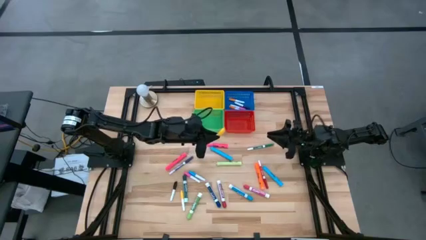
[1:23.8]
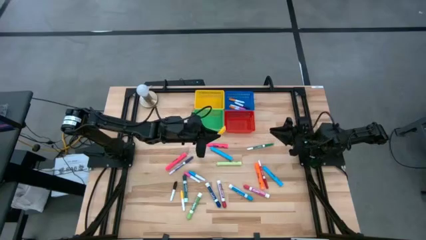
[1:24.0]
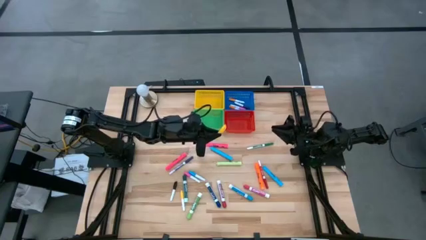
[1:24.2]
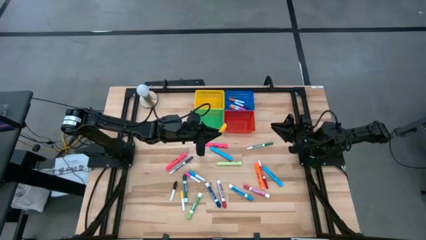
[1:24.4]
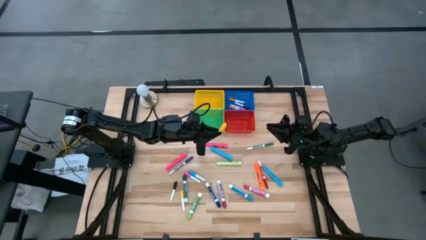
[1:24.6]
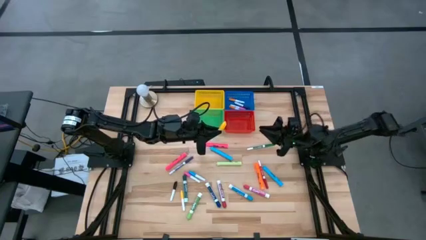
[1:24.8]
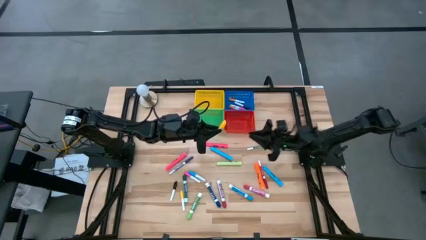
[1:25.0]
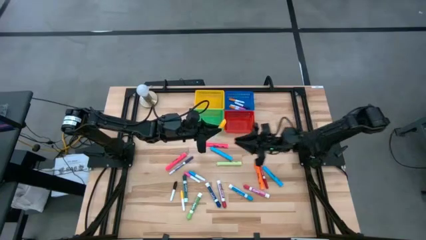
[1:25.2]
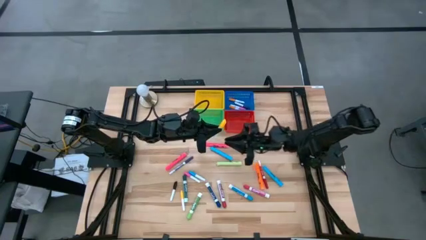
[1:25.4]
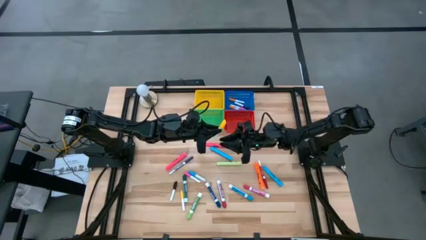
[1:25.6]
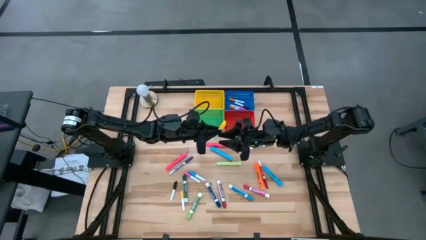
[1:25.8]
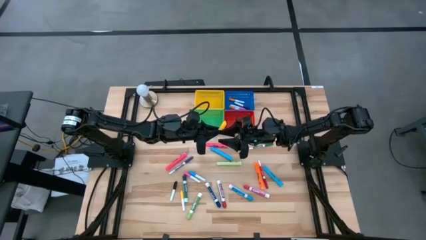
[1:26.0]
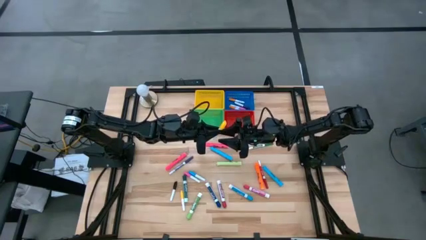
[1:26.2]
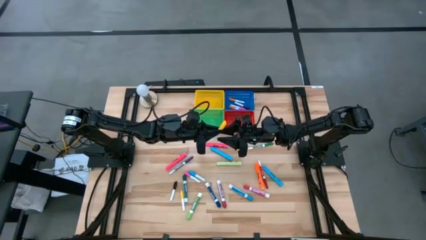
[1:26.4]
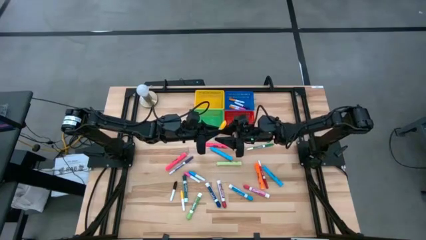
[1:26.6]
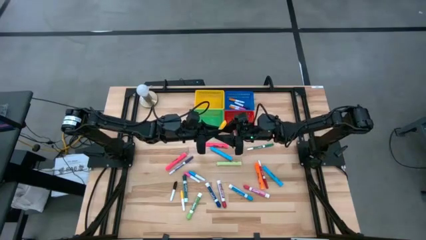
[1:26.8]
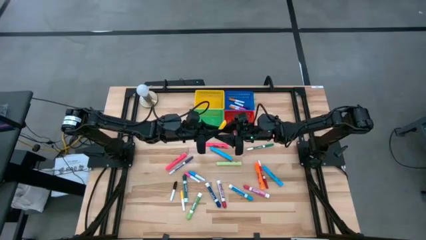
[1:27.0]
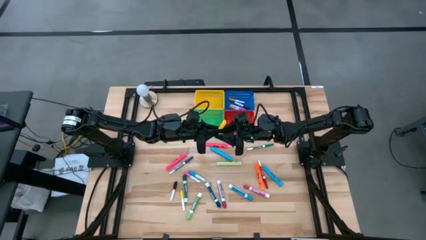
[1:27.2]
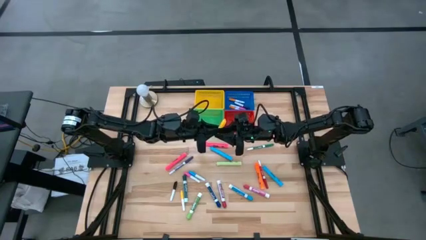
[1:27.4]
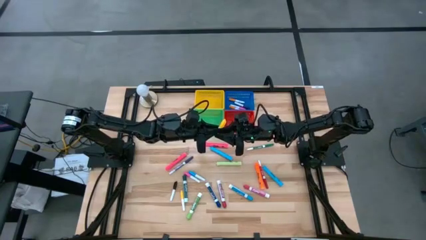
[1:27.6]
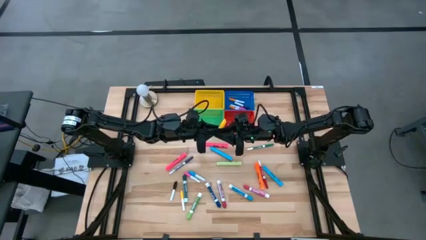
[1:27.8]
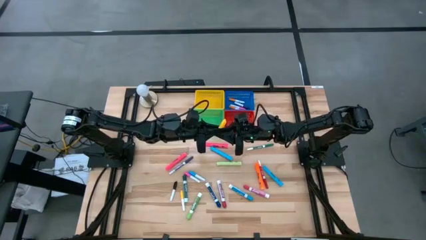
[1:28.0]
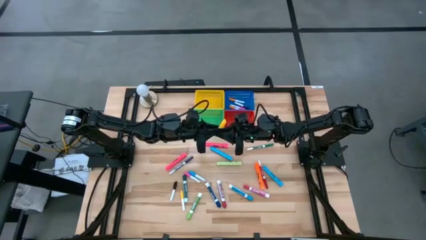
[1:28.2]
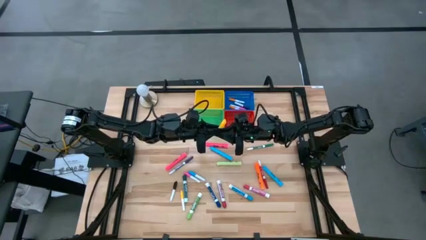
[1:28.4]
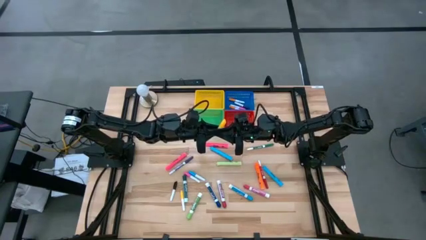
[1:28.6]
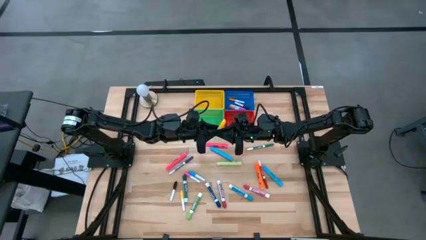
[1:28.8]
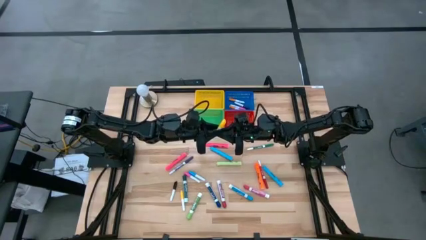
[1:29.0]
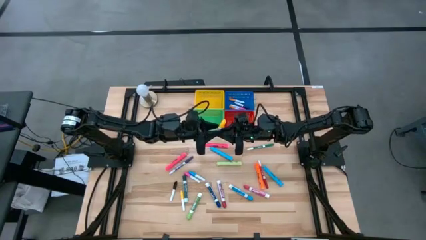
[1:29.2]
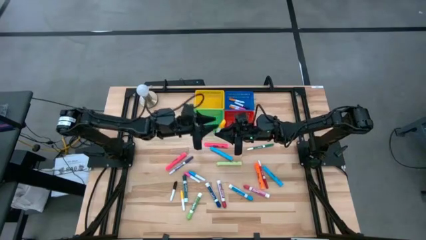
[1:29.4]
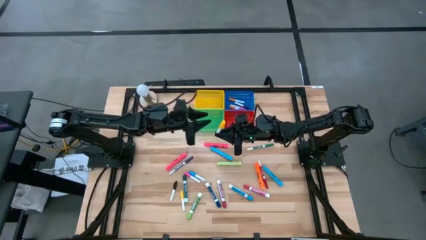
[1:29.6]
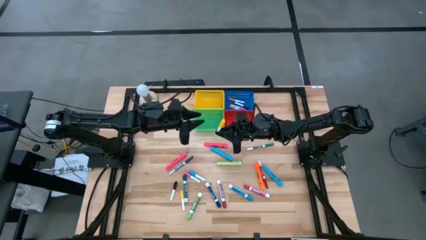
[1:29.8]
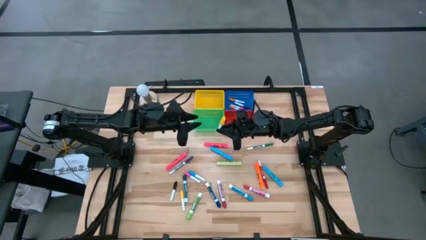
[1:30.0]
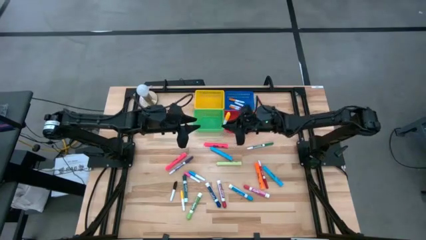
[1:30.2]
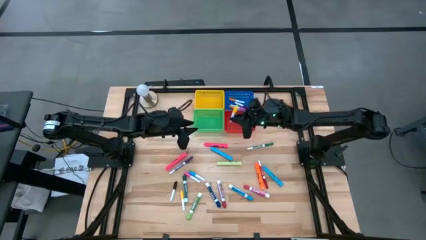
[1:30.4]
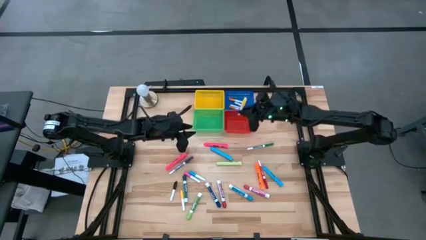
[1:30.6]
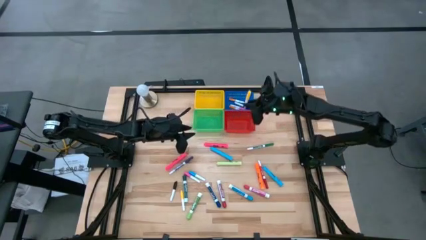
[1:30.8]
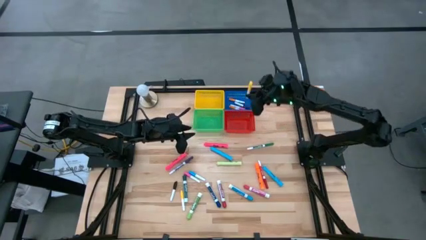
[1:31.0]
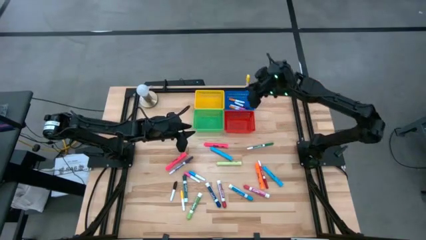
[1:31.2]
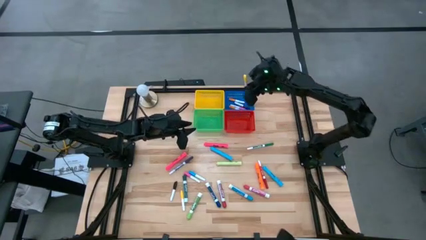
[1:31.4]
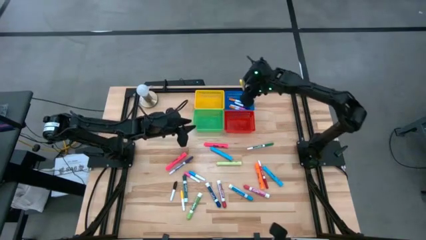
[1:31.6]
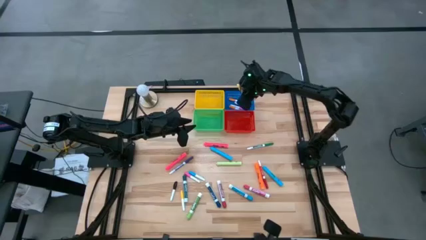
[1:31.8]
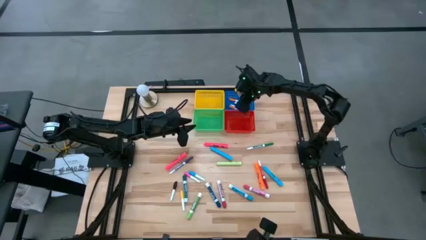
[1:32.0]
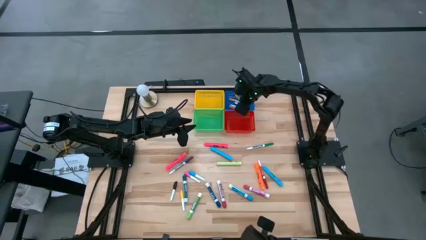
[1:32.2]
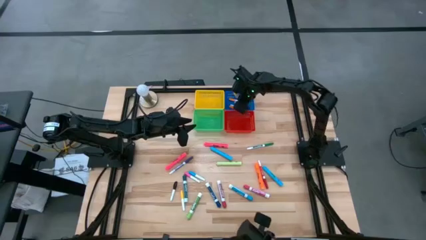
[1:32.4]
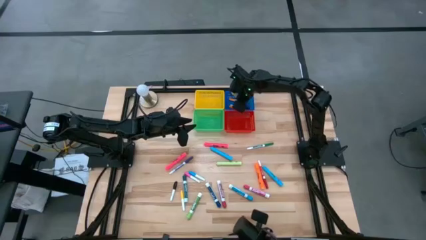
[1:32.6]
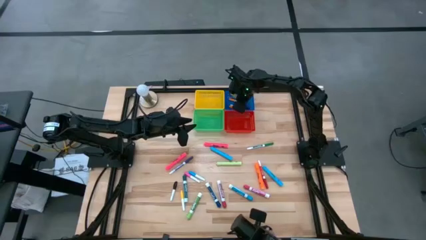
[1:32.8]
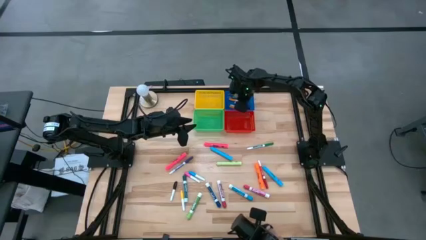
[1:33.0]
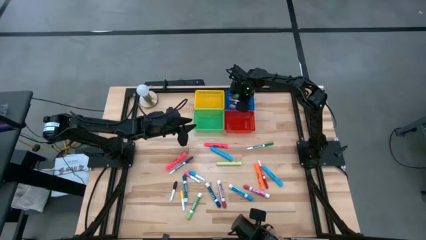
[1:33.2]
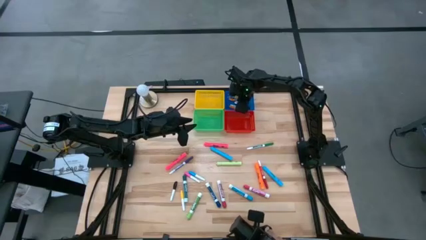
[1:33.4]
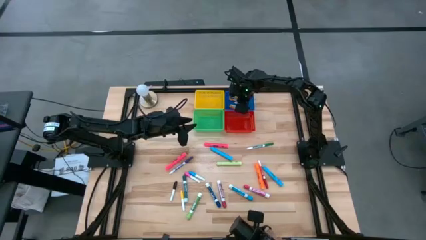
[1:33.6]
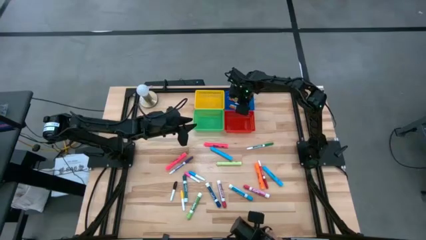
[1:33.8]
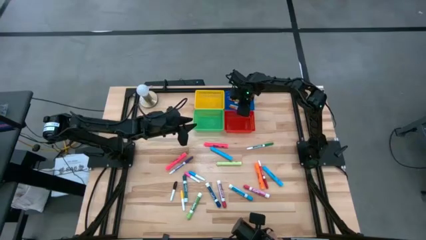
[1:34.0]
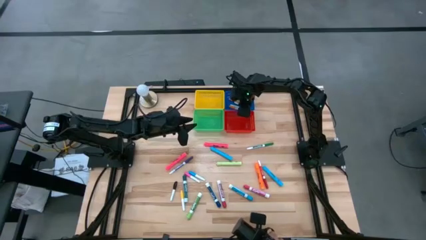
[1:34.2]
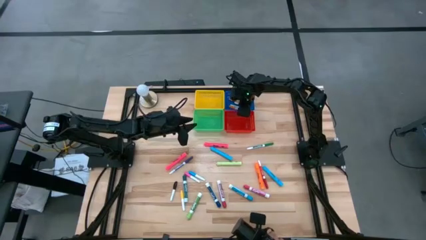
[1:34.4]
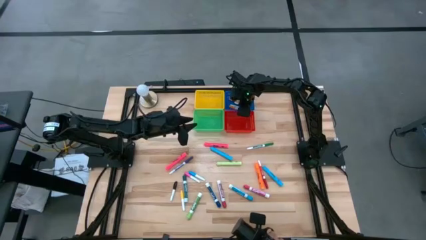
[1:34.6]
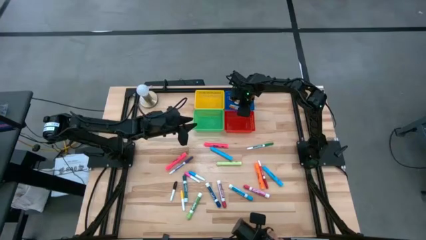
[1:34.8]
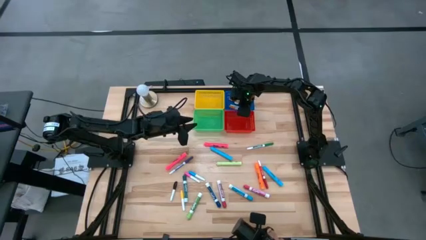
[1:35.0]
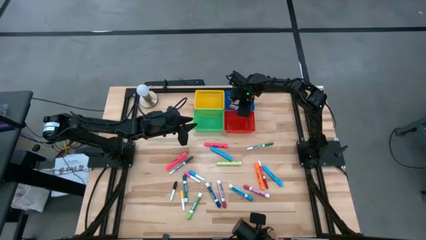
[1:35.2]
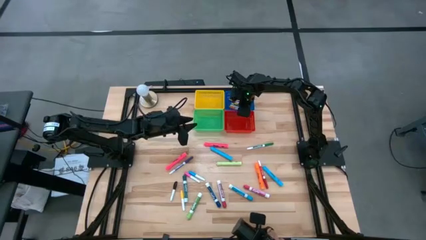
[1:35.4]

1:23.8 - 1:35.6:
Task: Pick & Place Markers
Put the top small yellow highlighter pen into the blue bin
